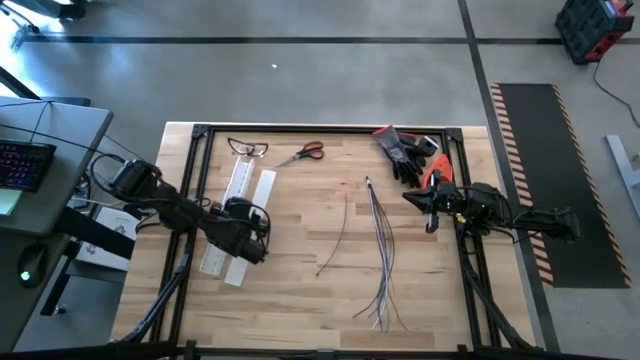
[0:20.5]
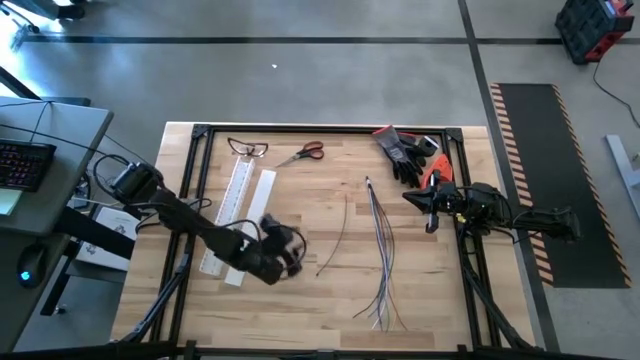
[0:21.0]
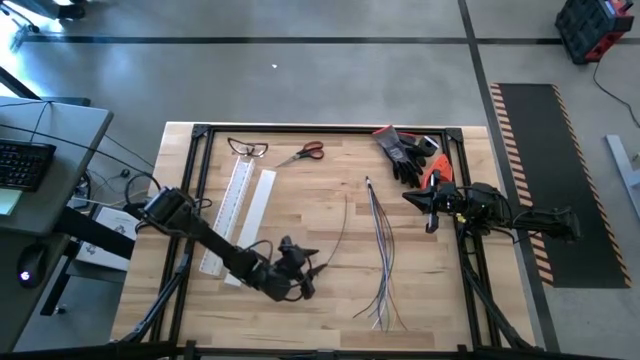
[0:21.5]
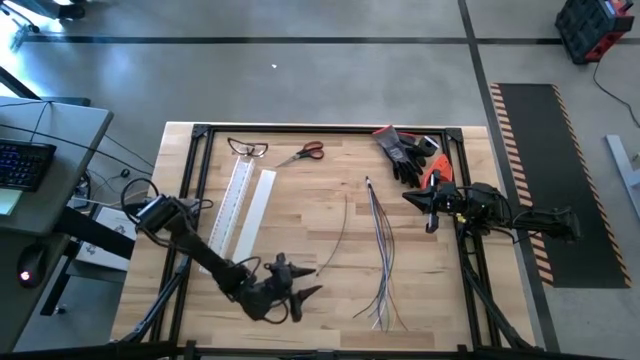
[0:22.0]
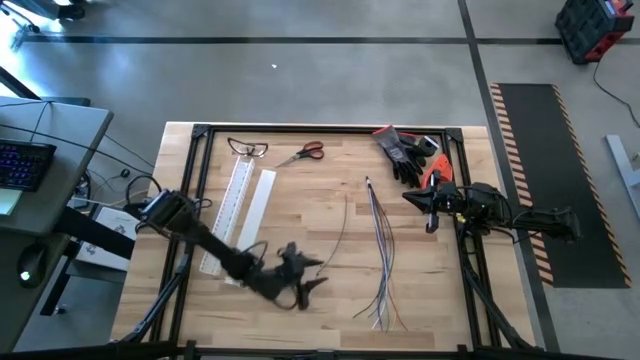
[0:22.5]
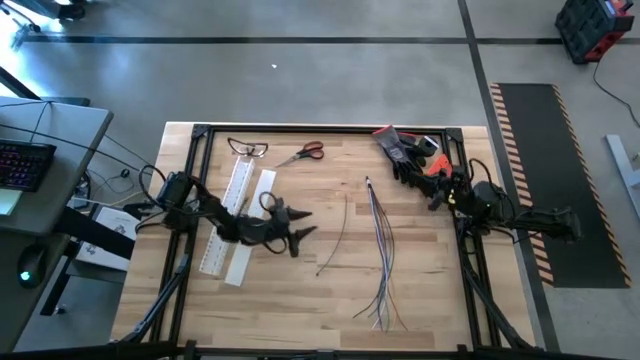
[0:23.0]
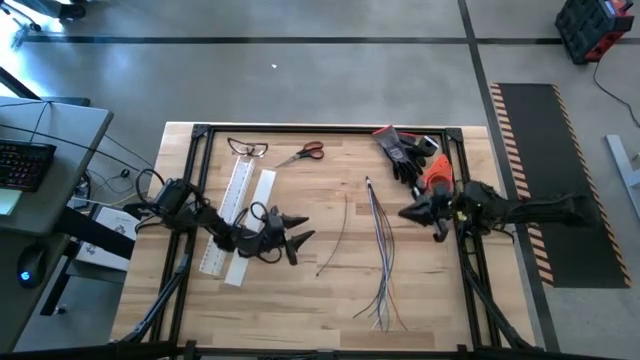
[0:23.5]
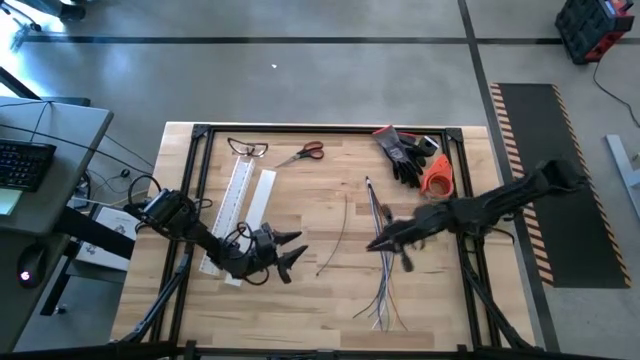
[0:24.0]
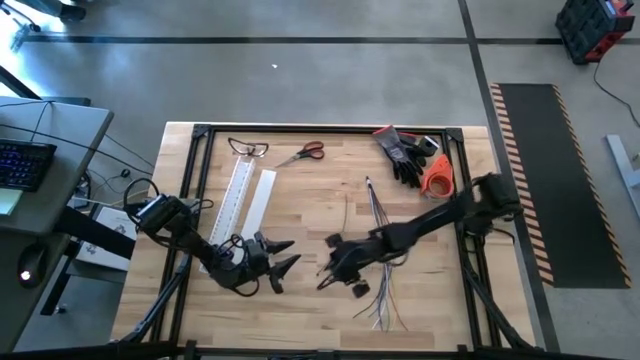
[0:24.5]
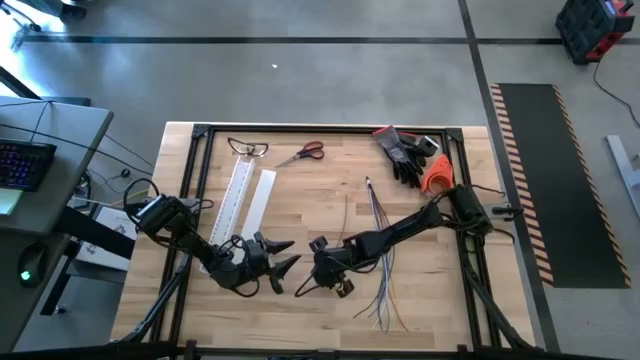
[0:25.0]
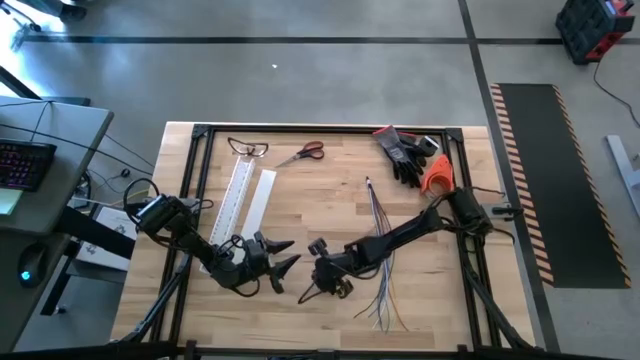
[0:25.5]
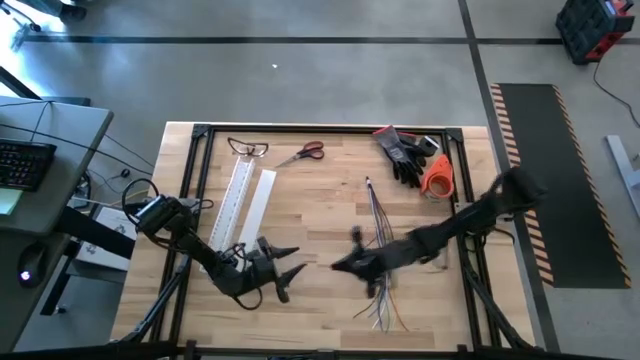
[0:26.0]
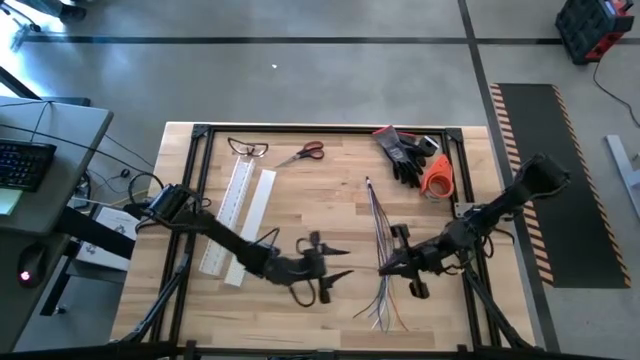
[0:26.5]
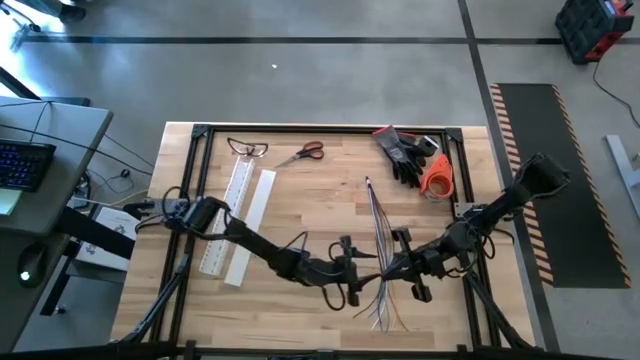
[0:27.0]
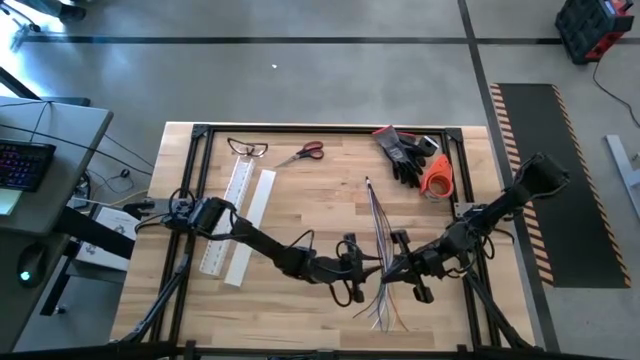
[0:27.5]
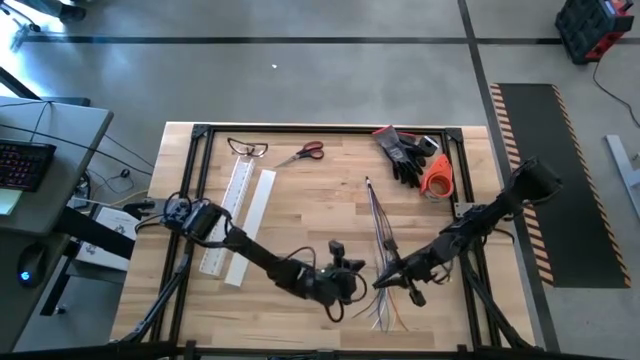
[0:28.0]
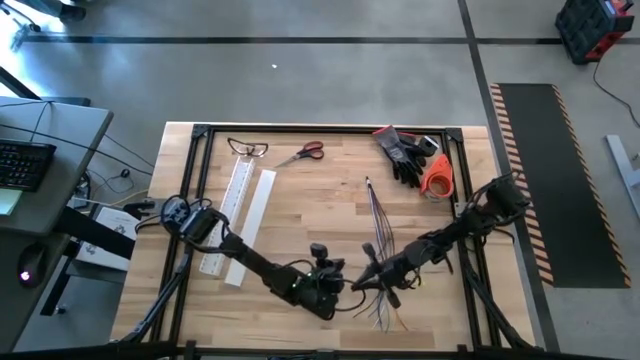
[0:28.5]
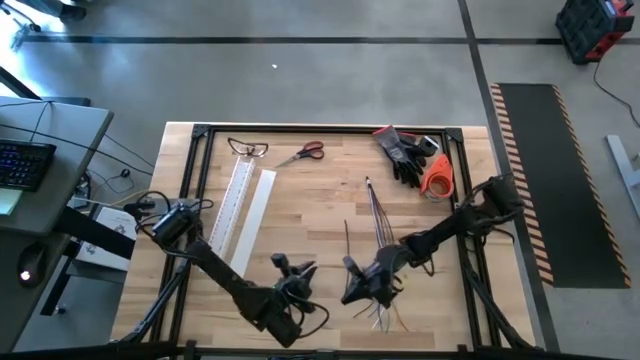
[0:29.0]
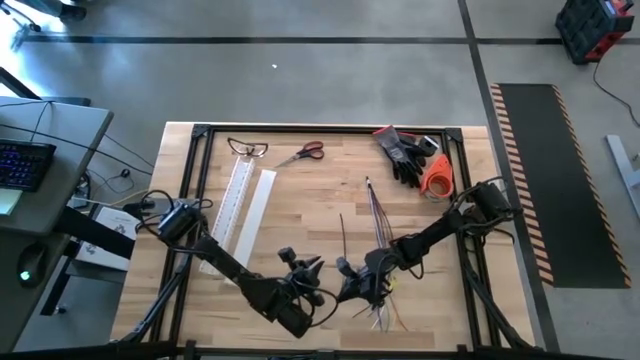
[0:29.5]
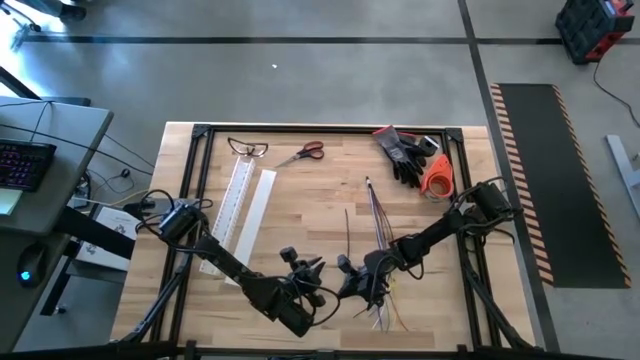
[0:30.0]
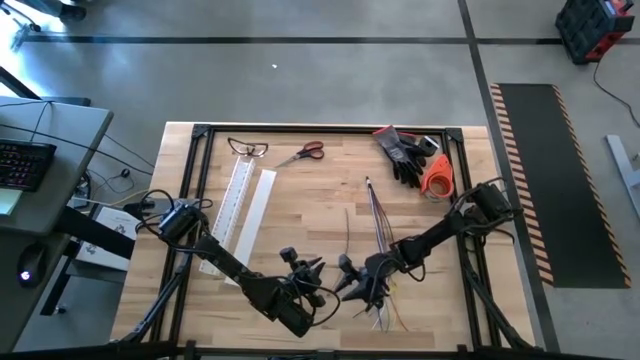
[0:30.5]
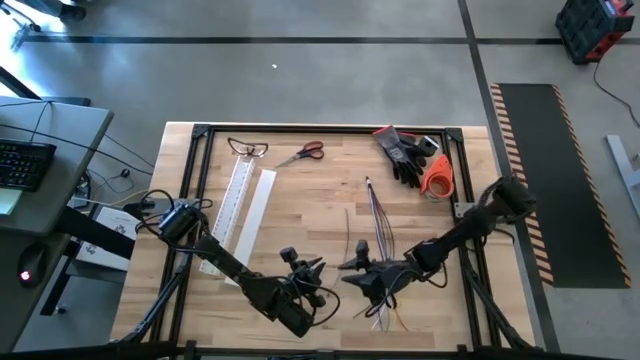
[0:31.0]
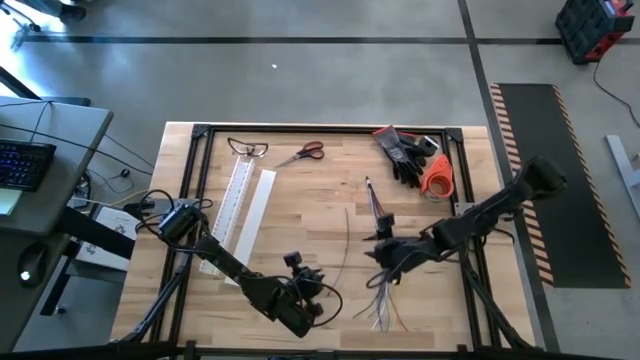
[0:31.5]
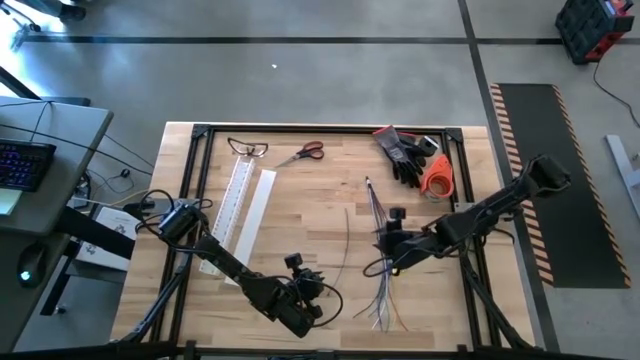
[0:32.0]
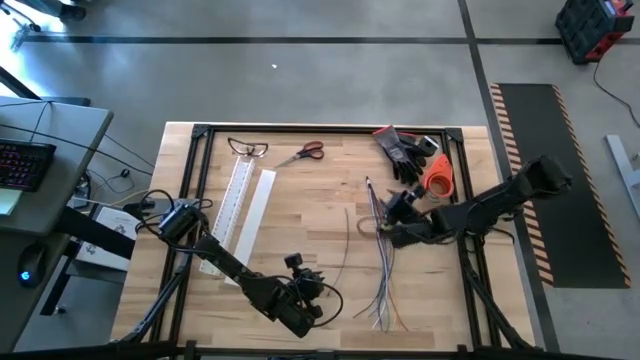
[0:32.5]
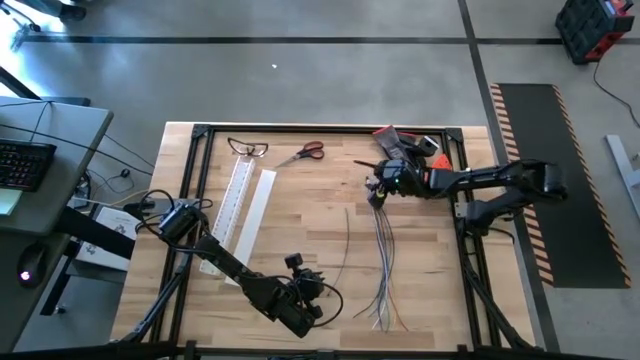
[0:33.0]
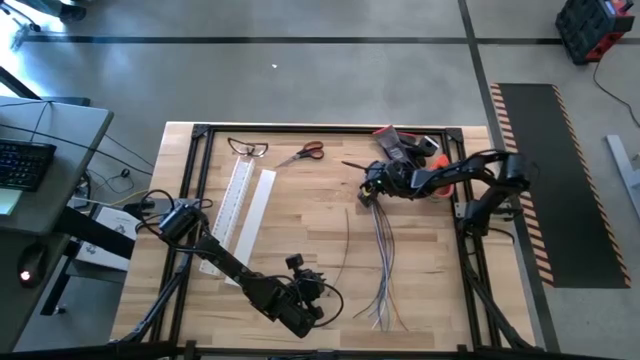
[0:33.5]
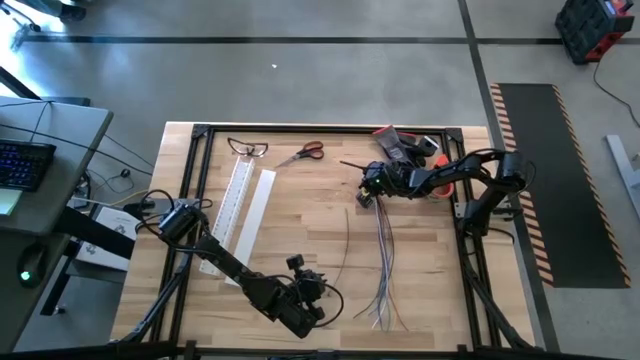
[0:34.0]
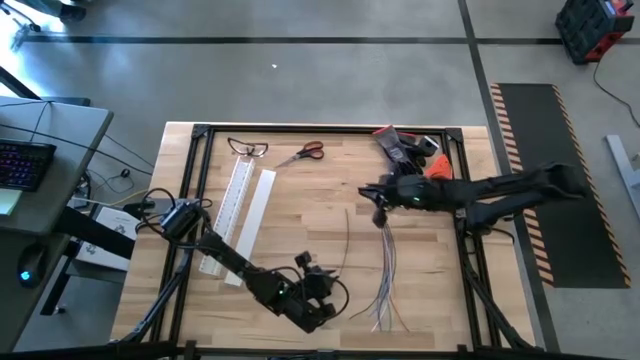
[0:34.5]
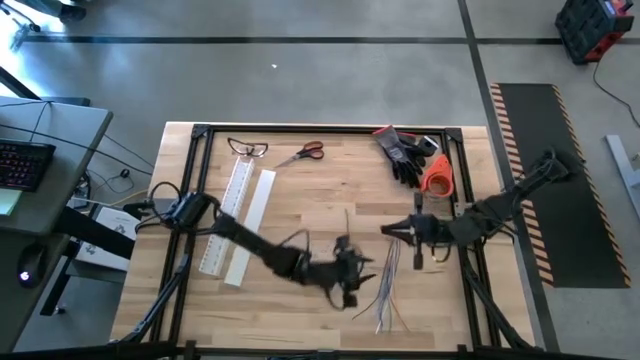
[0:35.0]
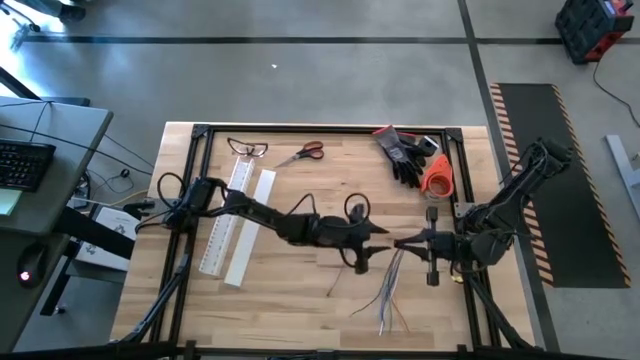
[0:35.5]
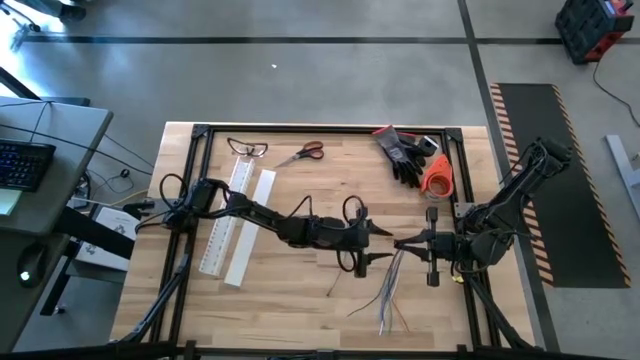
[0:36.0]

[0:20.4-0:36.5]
Task: Ziptie cables
Wrap the black zip tie around the cable

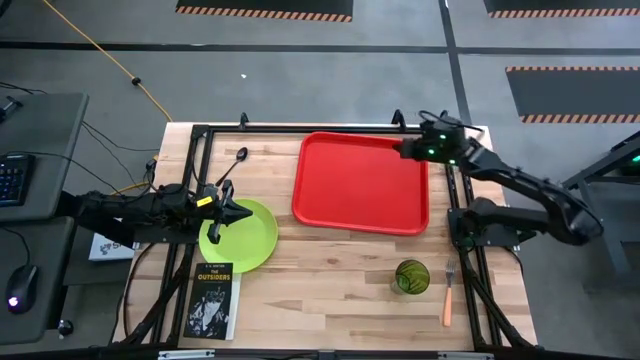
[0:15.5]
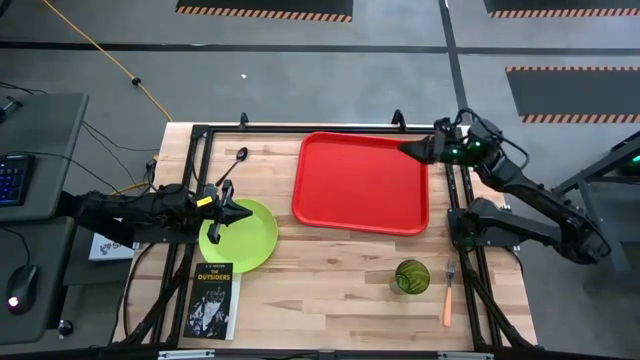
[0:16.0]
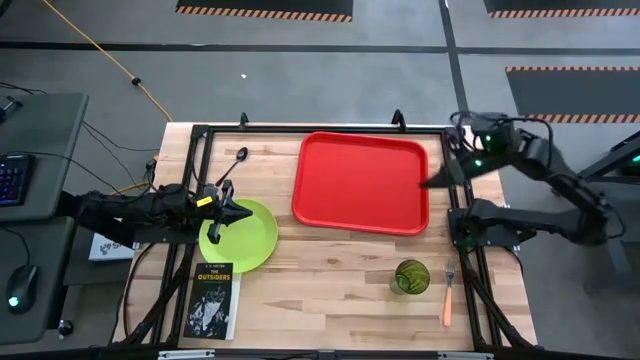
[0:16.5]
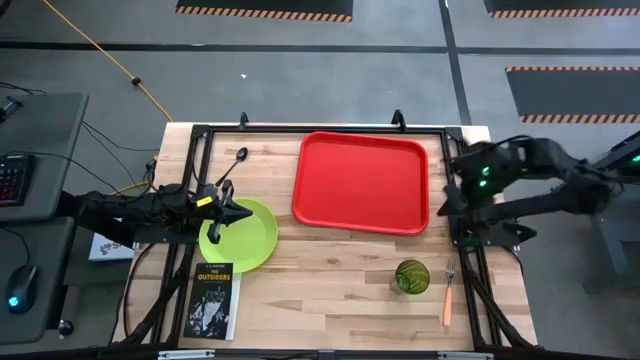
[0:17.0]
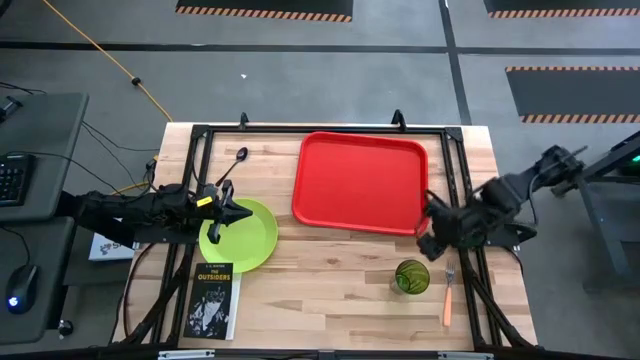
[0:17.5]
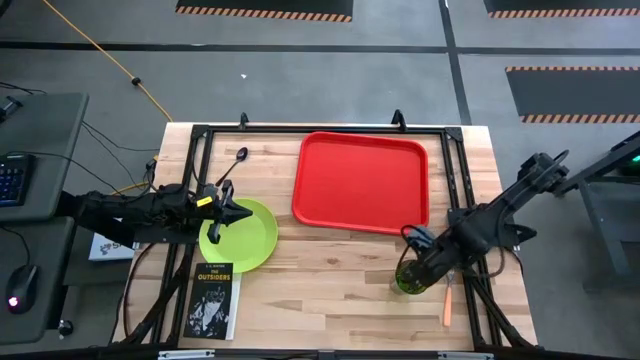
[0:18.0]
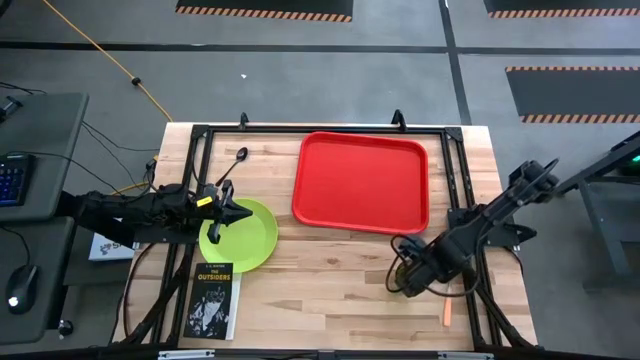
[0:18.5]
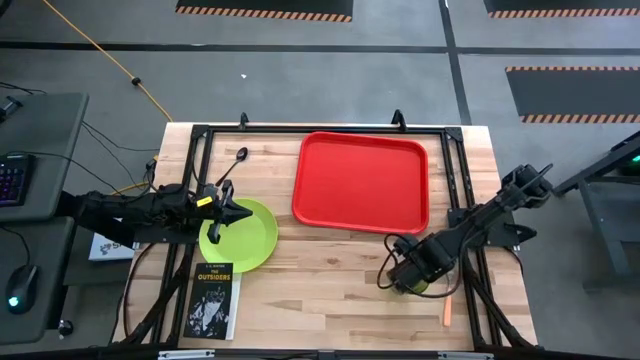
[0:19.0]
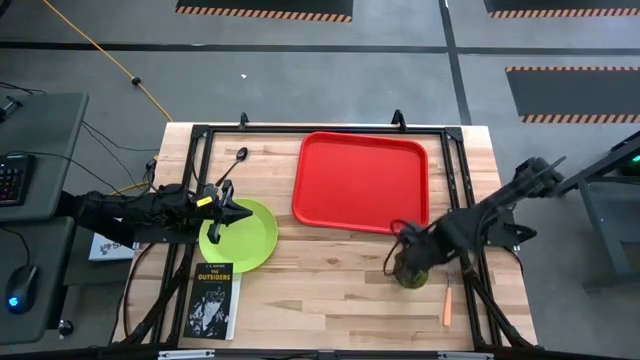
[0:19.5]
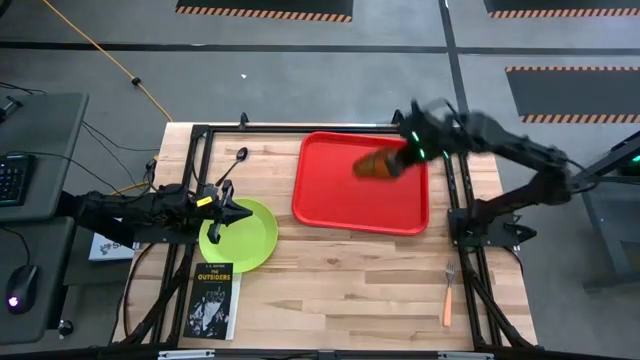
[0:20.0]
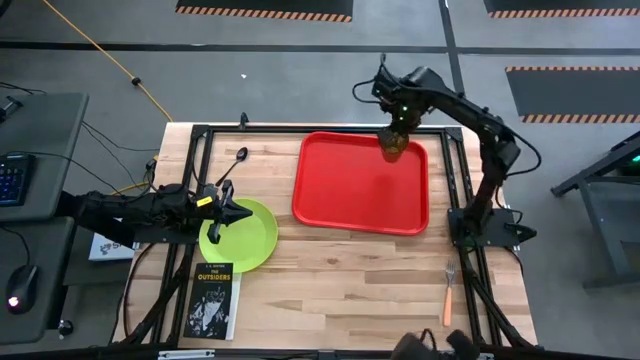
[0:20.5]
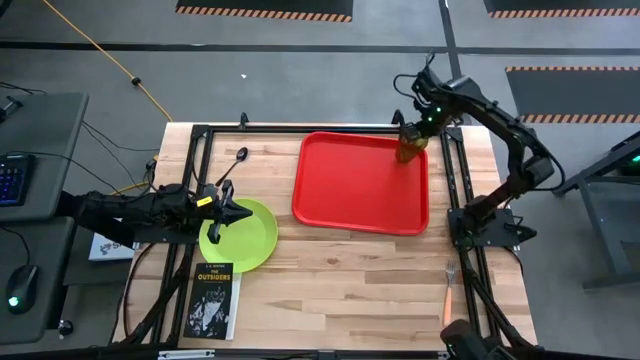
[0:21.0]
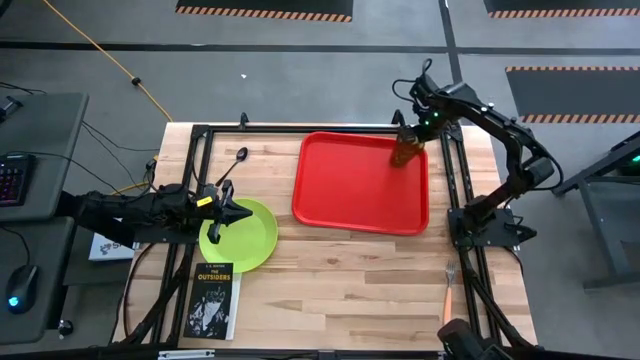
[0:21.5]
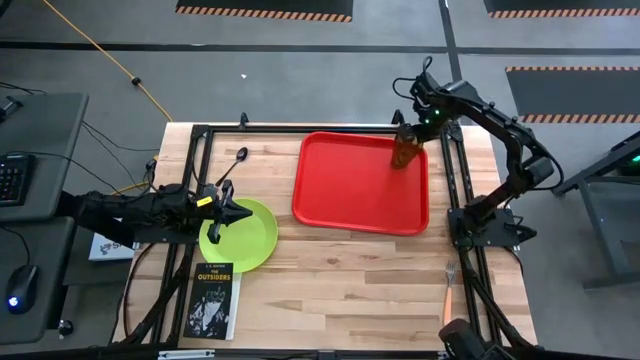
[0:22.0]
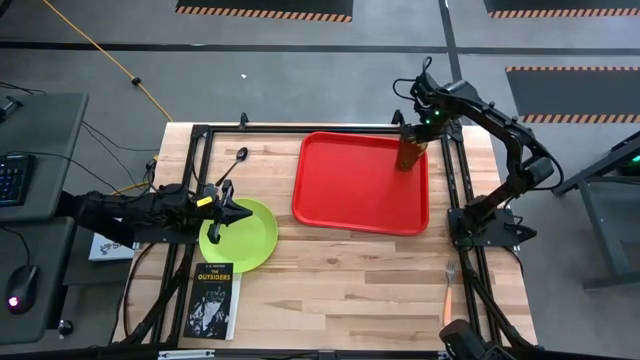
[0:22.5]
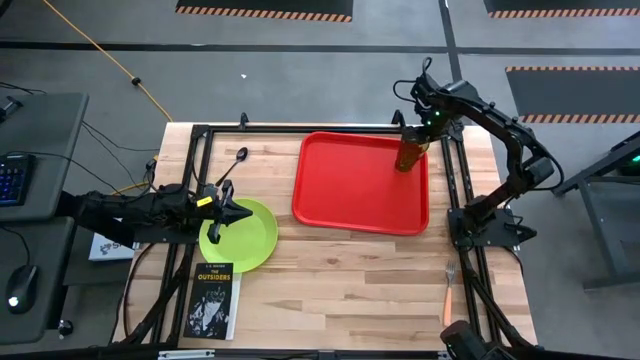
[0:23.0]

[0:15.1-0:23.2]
Task: Pick and place plate/cup/fork/spoon on tray
Put the green cup on the red tray
